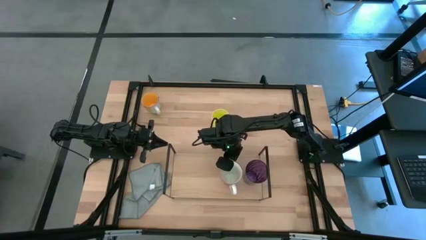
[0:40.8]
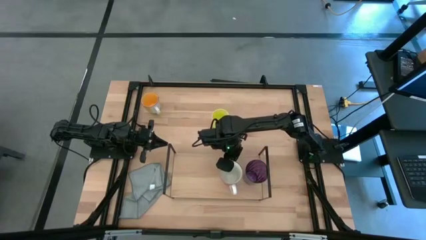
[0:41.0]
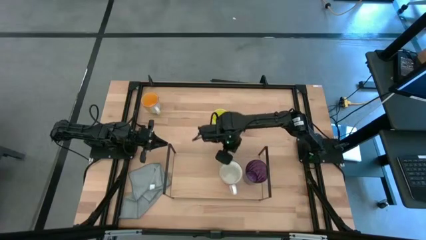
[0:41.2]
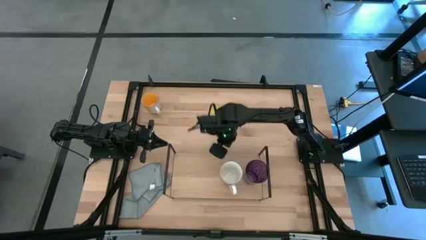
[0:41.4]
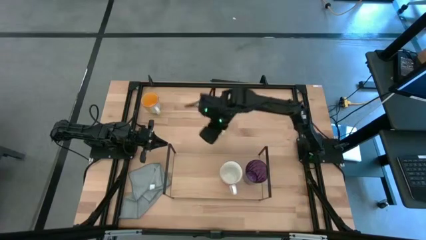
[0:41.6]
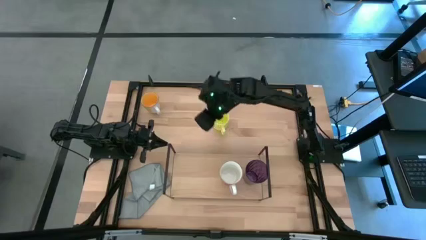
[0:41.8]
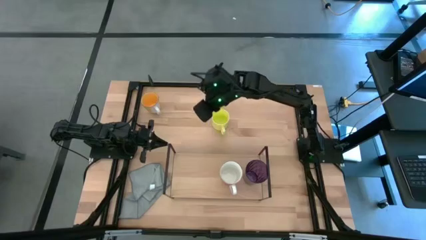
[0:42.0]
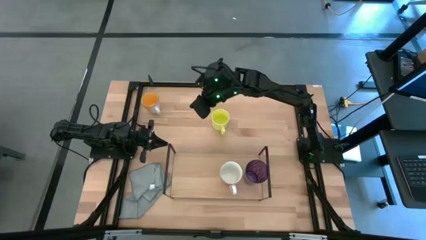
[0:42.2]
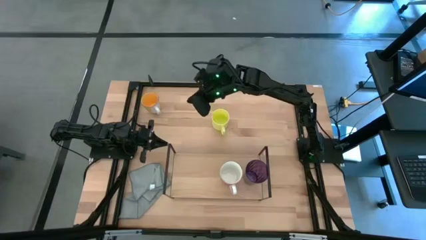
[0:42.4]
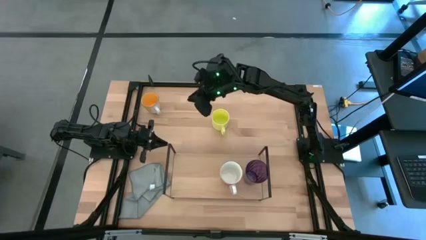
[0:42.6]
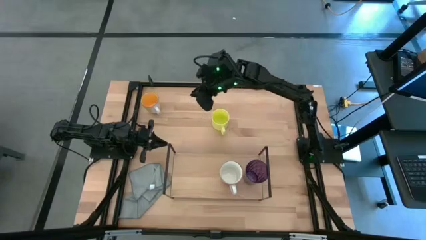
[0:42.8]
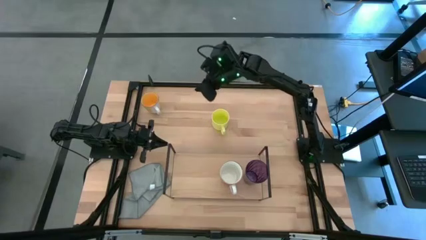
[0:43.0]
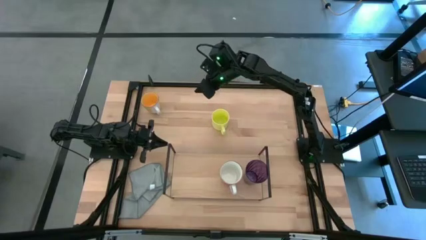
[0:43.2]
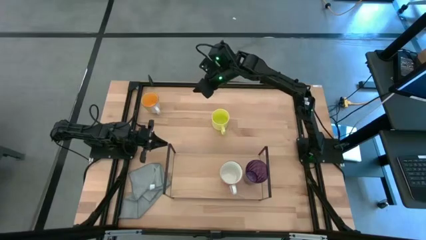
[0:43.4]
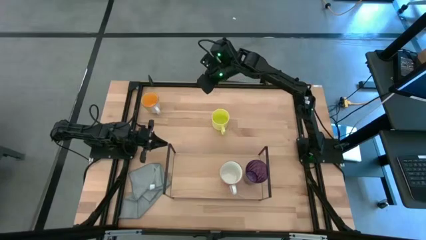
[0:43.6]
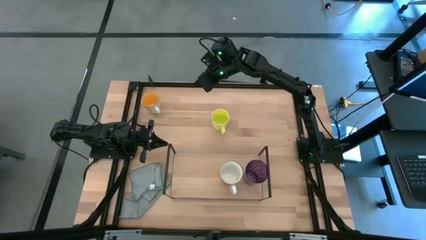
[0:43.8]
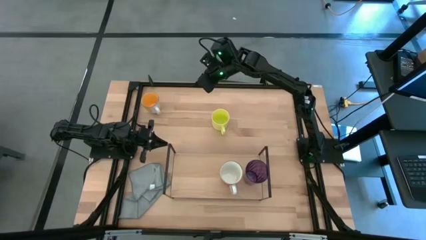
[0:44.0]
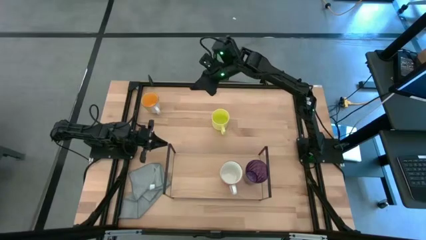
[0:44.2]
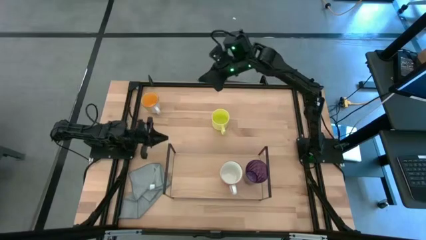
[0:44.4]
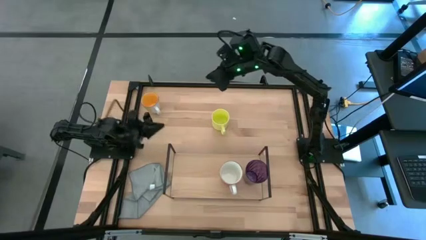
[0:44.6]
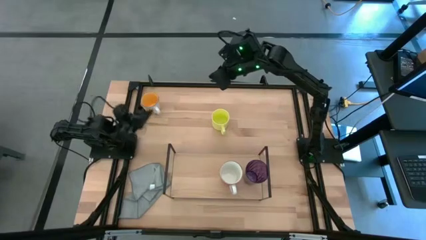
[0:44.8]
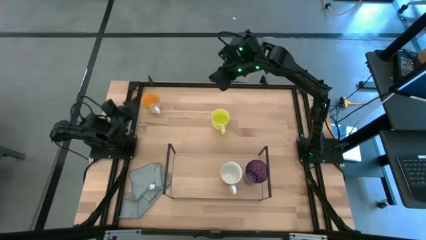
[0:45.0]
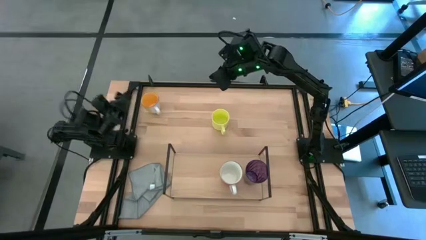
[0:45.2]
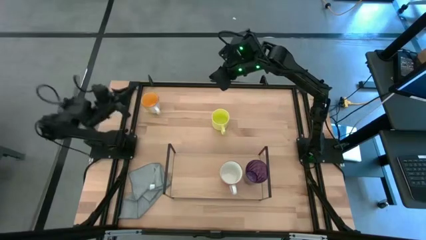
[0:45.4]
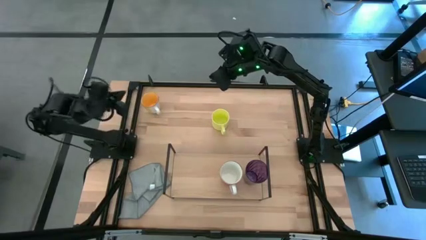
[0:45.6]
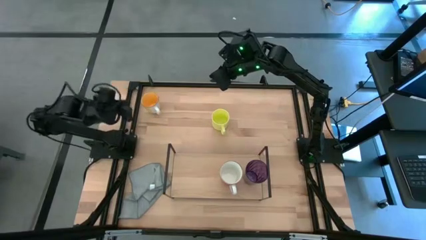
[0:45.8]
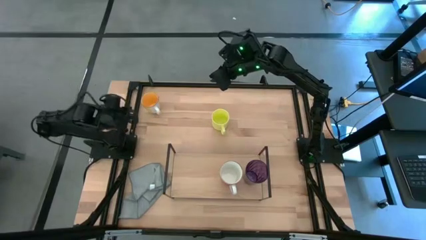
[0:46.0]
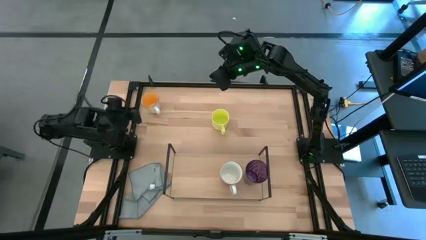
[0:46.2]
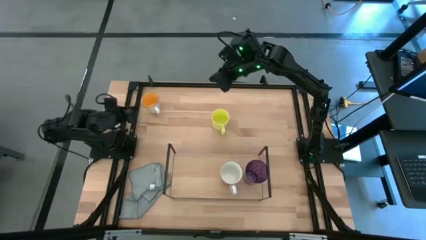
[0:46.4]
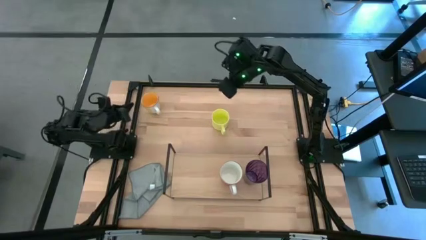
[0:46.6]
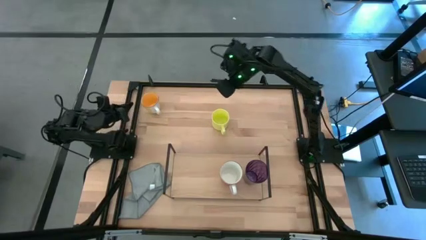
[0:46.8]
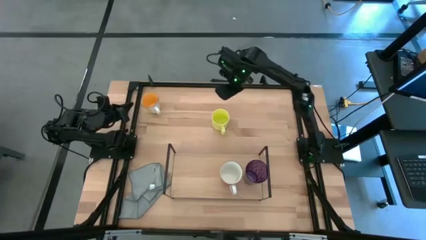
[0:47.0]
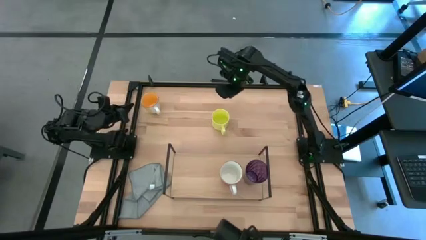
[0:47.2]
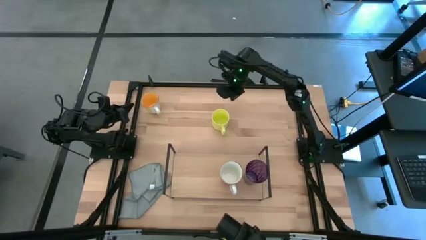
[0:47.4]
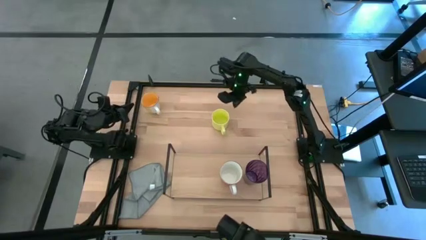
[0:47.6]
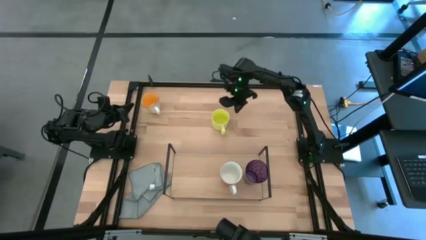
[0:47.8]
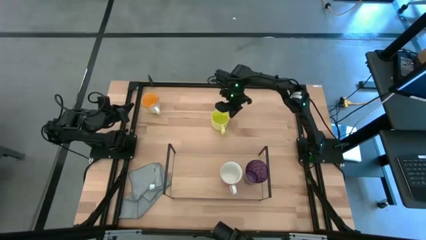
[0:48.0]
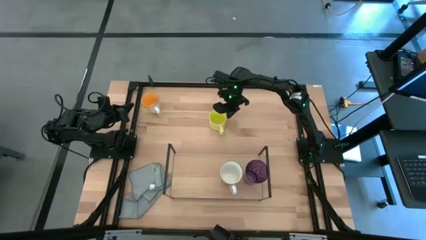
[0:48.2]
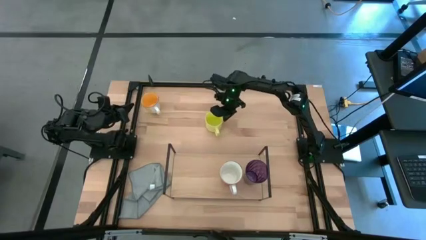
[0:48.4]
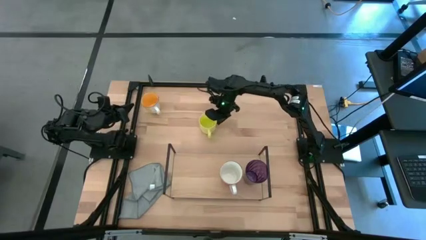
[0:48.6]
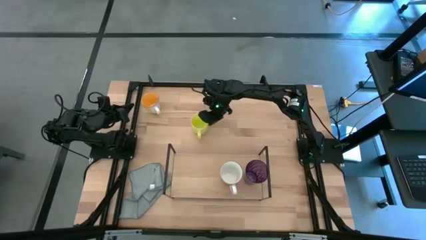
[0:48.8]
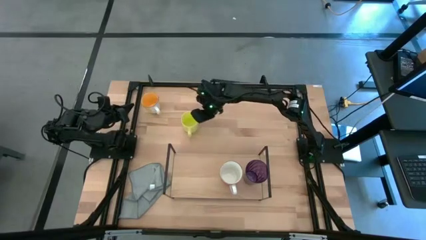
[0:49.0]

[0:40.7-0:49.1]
Task: Stack small to large cups/mugs on shelf
Adjust the yellow mug

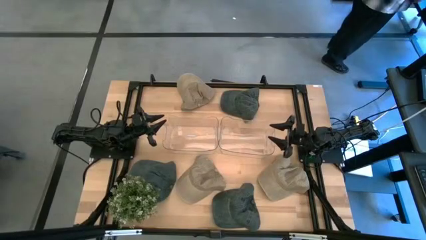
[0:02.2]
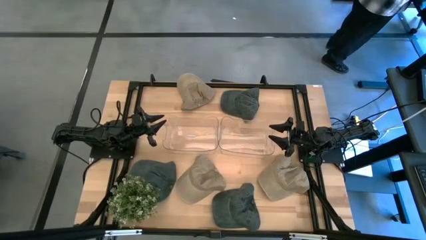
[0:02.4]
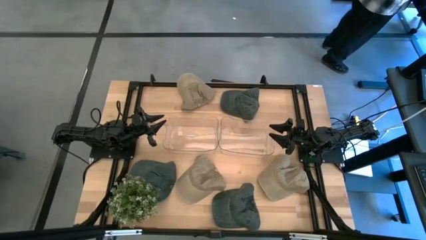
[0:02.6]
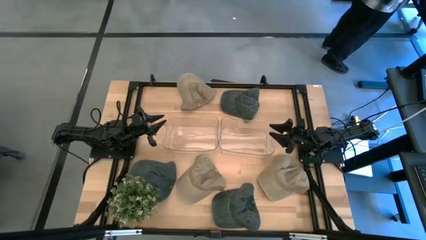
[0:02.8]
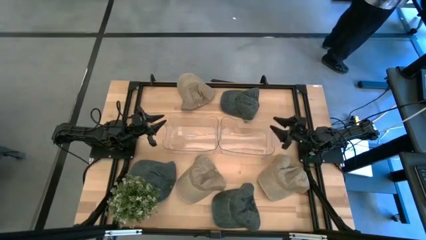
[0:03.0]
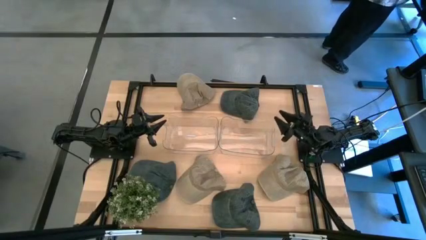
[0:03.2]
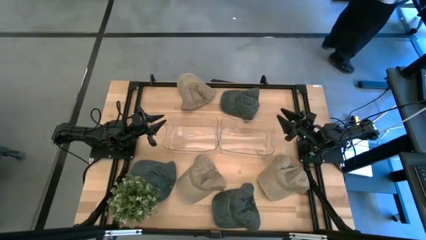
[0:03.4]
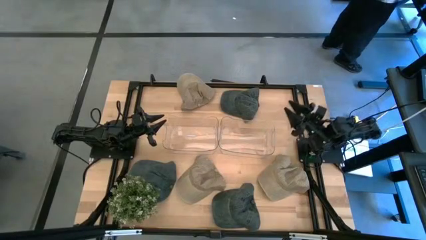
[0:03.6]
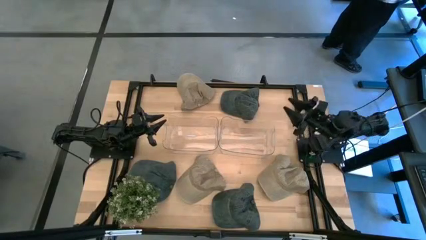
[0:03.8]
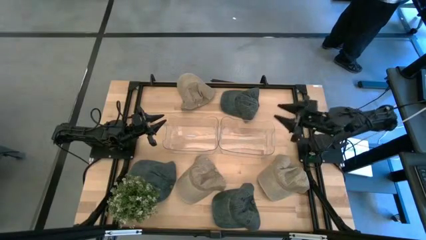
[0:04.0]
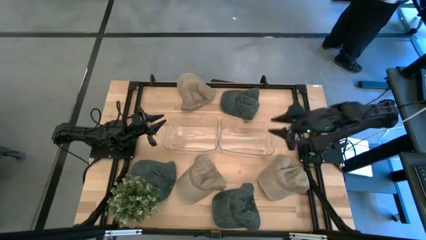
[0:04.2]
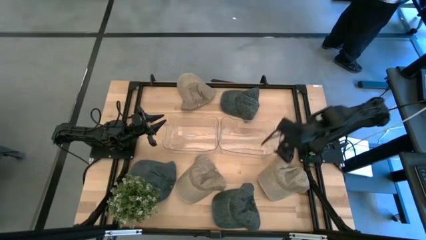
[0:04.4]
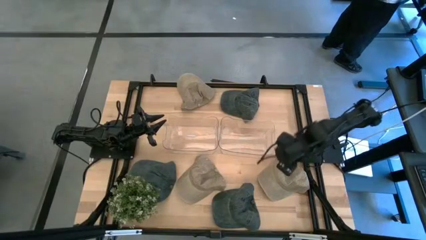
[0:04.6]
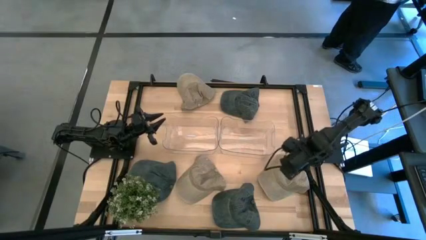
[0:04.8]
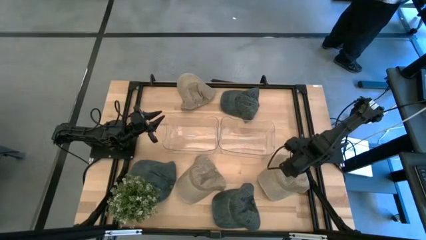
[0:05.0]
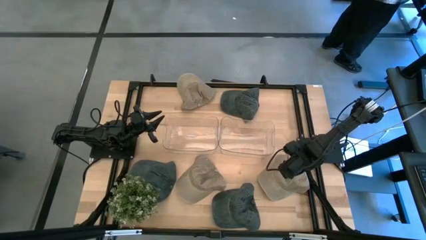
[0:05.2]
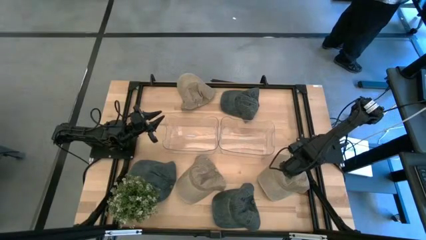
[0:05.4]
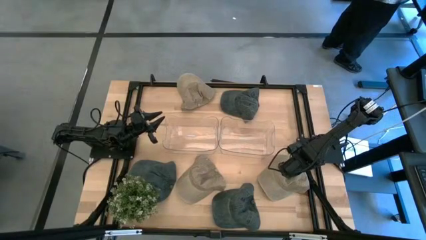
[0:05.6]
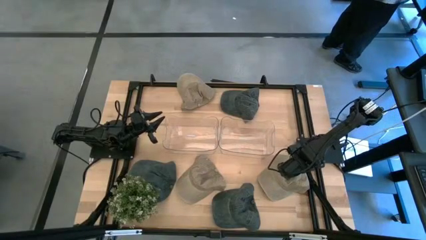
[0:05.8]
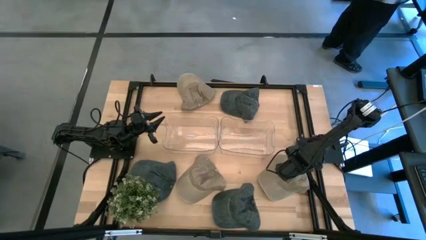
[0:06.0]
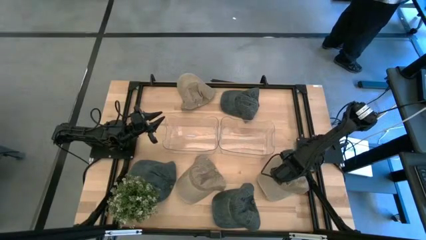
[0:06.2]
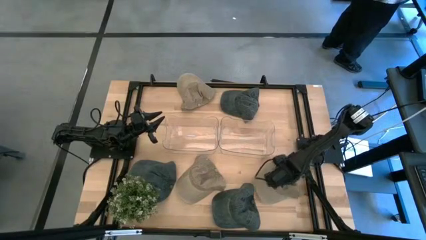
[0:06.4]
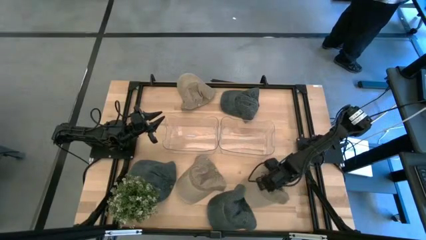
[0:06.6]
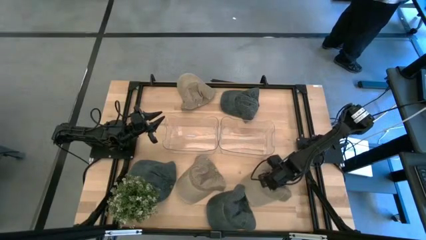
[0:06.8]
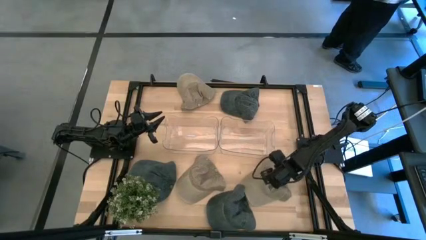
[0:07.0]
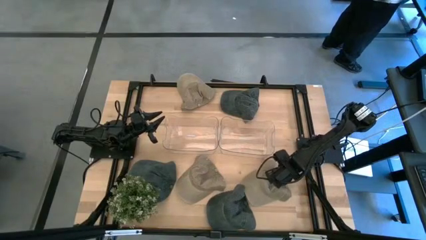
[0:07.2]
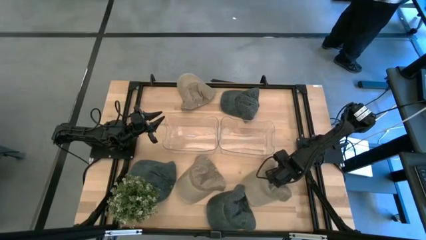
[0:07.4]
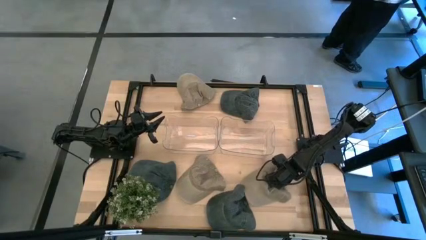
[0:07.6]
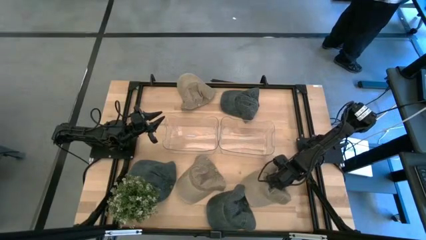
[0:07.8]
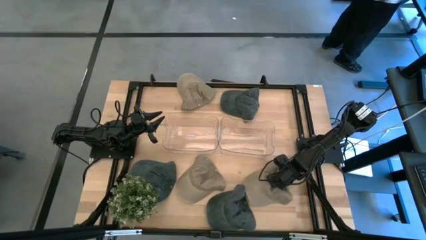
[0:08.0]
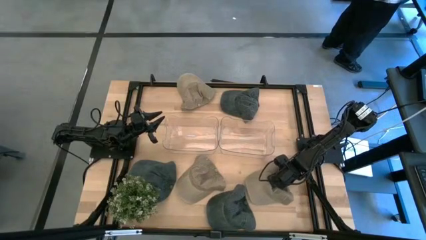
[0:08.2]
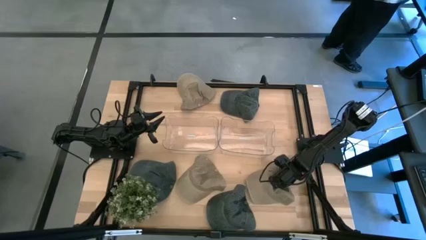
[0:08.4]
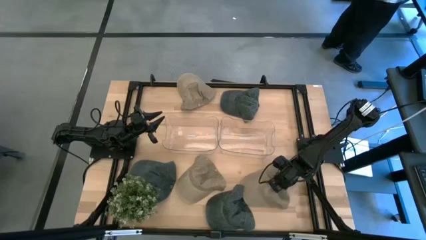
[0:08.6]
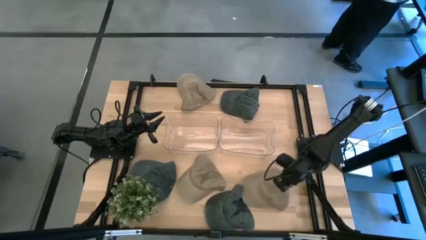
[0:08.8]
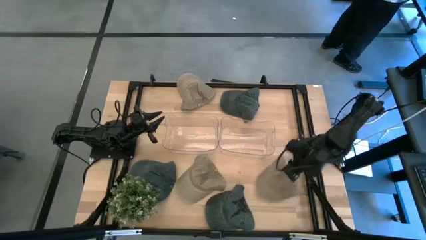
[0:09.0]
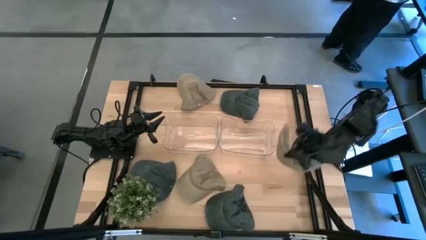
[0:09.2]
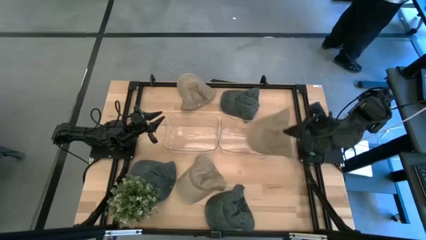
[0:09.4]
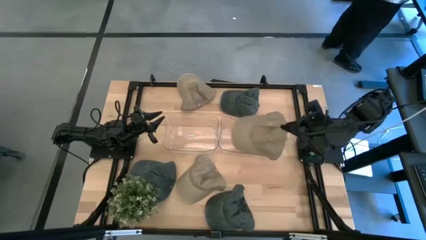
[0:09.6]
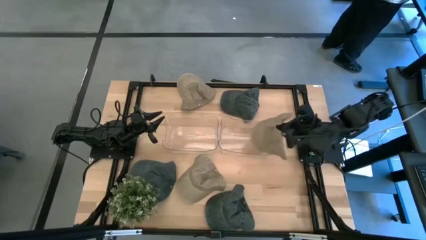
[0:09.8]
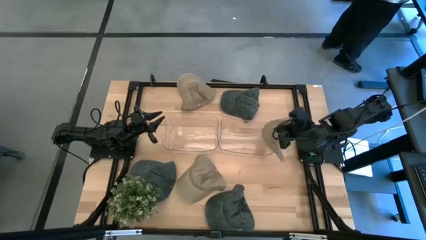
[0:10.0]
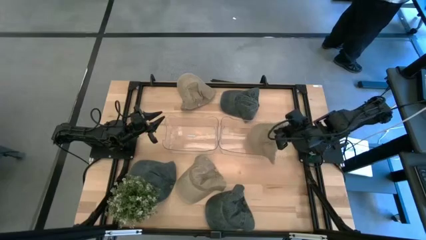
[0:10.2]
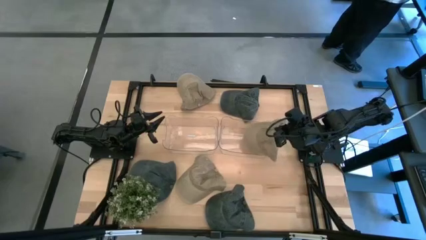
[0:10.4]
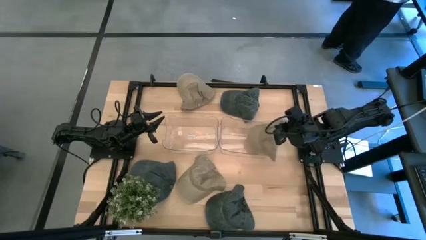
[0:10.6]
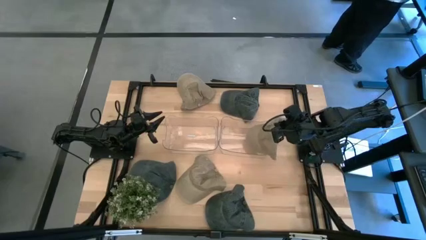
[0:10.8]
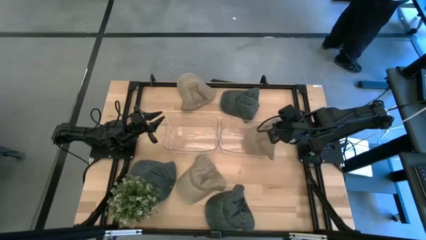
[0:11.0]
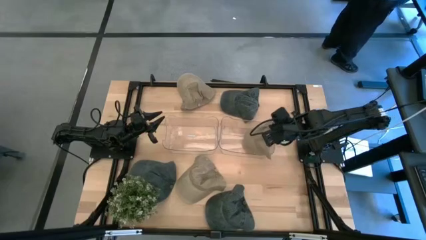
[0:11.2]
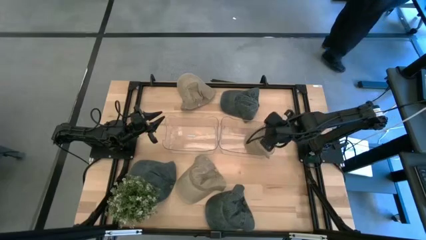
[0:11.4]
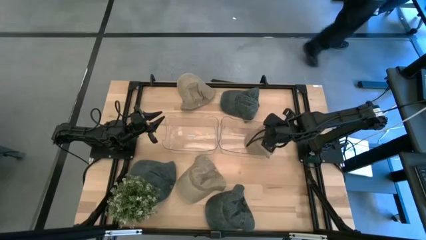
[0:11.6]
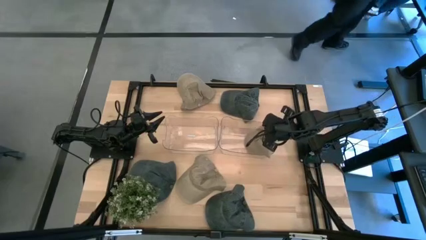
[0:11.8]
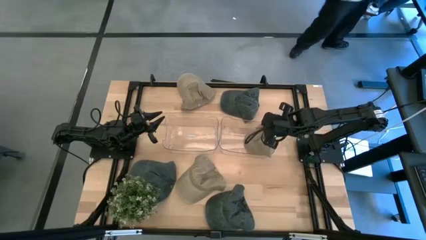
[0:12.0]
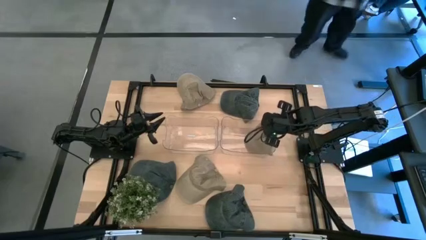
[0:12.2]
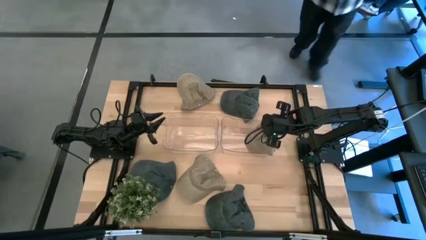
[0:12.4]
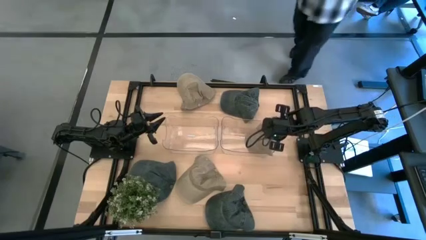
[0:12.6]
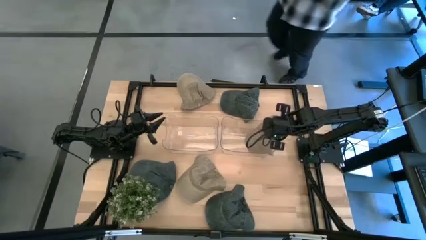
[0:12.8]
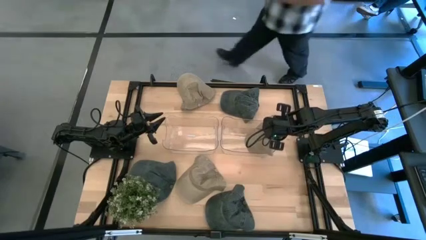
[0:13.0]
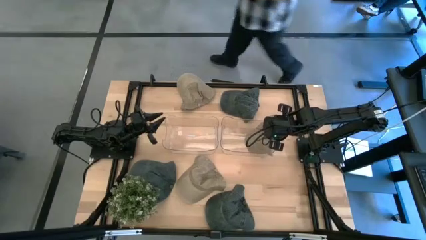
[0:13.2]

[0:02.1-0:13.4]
Task: Pick & Place hat
Put the bottom right brown cap into the right transparent bin
